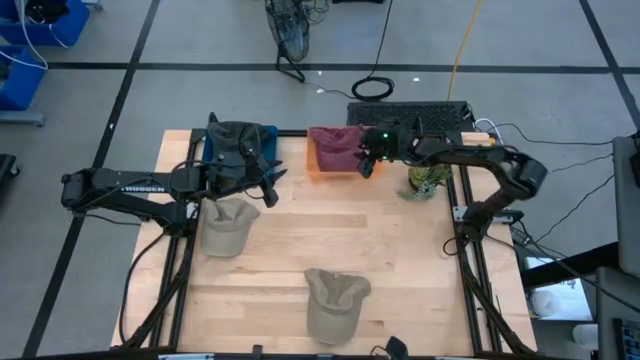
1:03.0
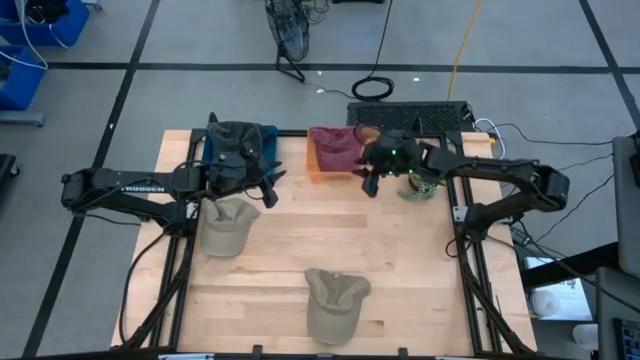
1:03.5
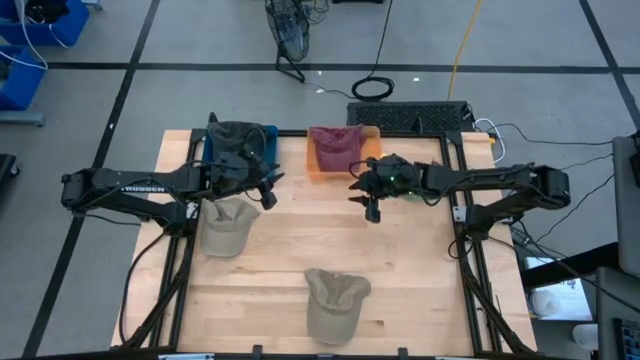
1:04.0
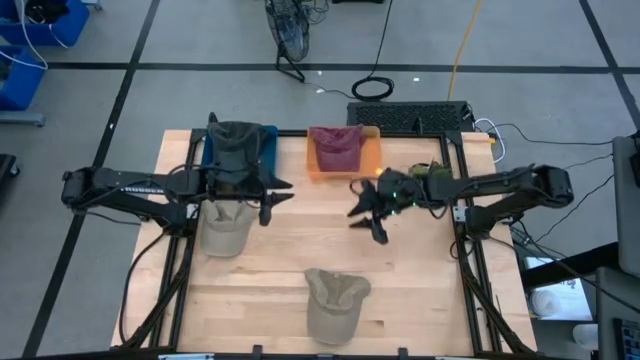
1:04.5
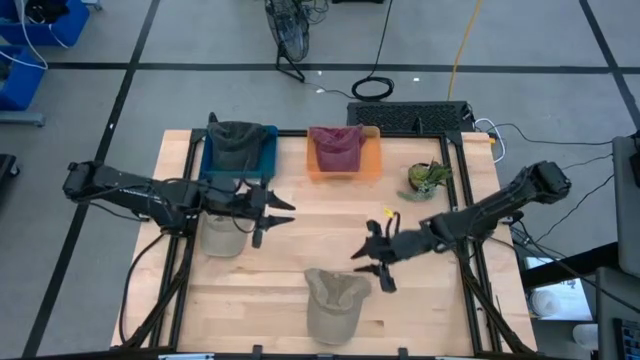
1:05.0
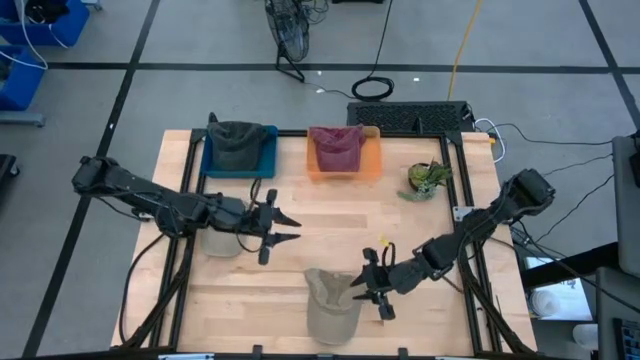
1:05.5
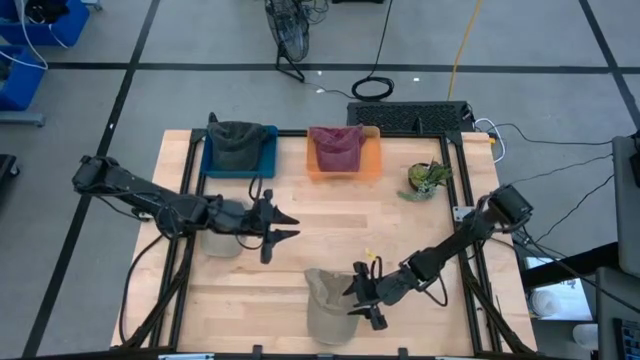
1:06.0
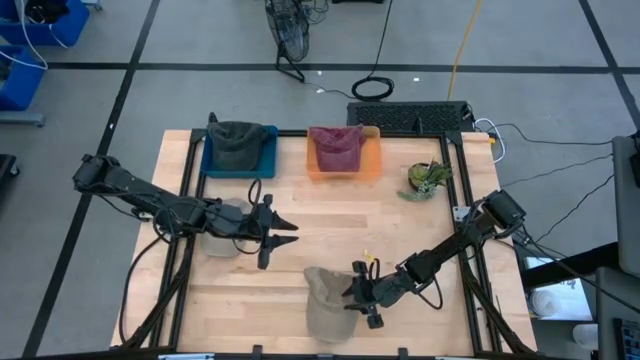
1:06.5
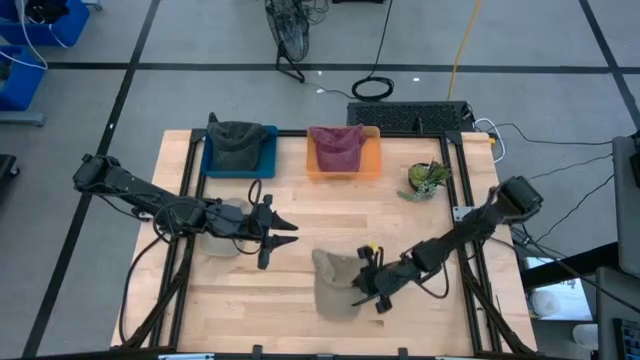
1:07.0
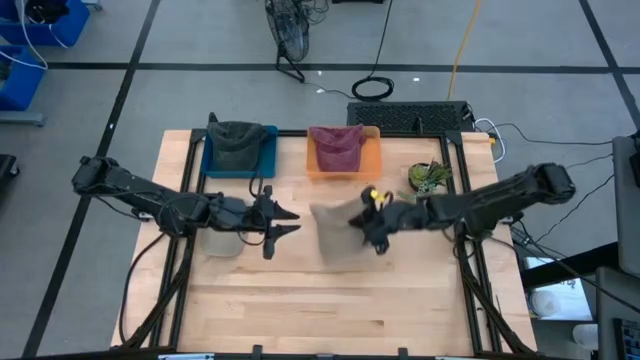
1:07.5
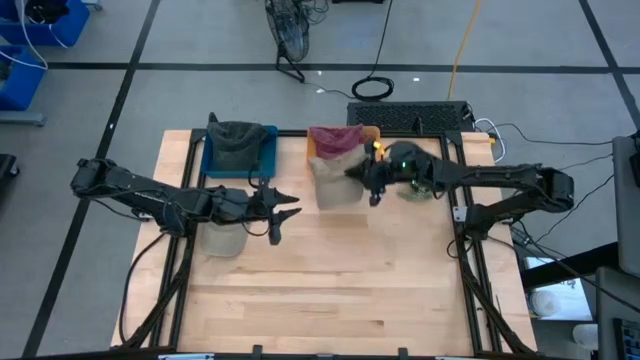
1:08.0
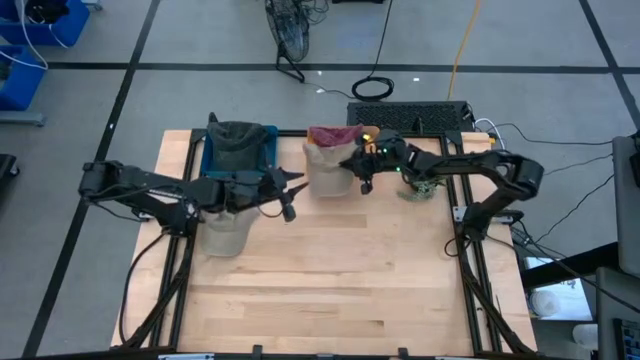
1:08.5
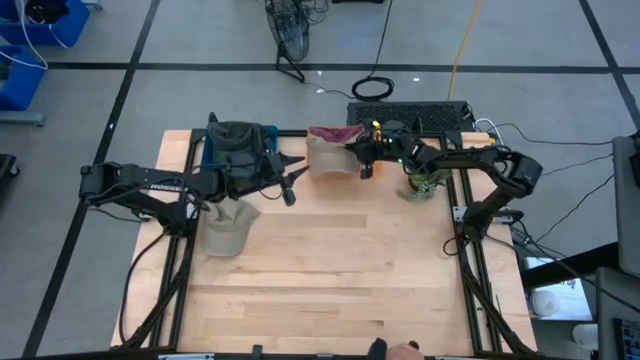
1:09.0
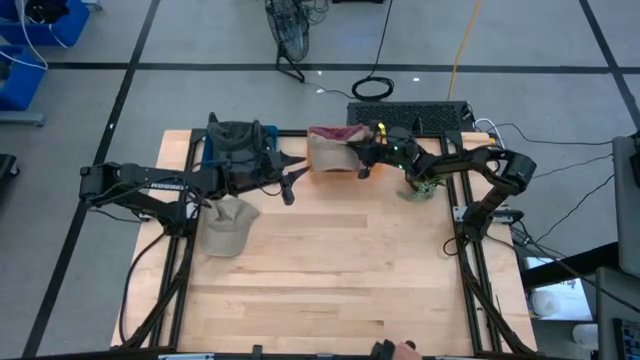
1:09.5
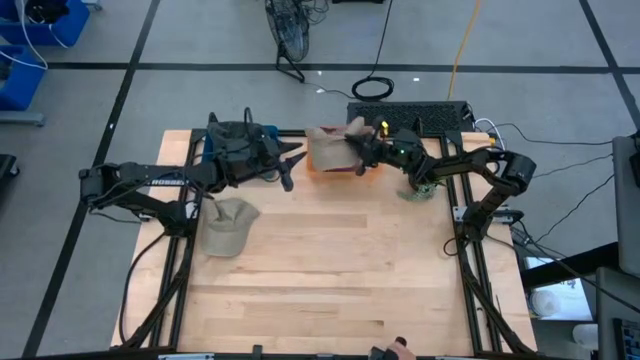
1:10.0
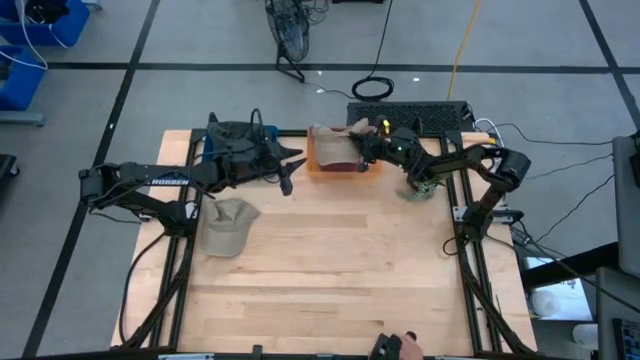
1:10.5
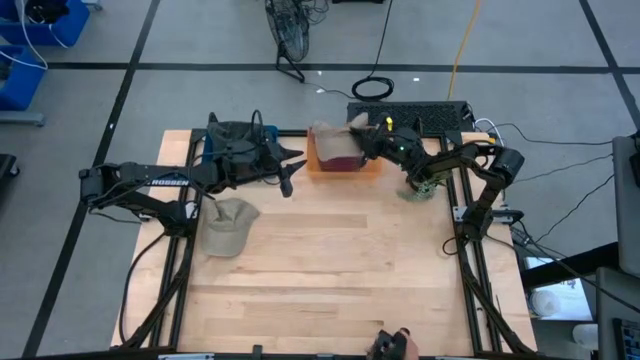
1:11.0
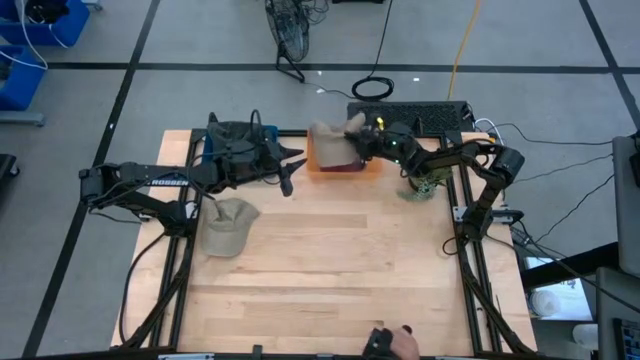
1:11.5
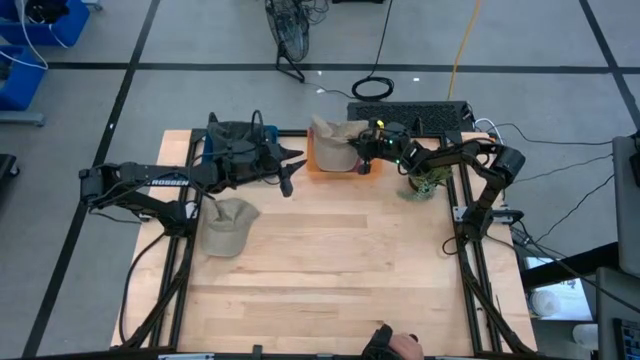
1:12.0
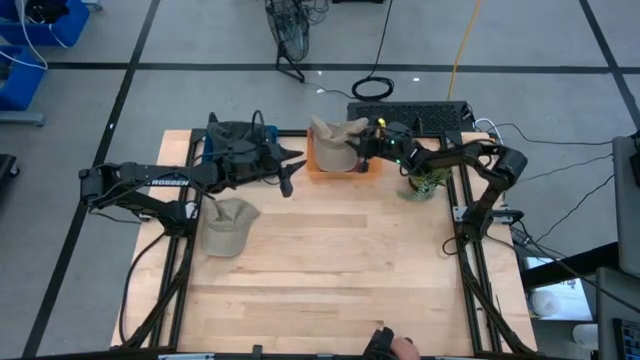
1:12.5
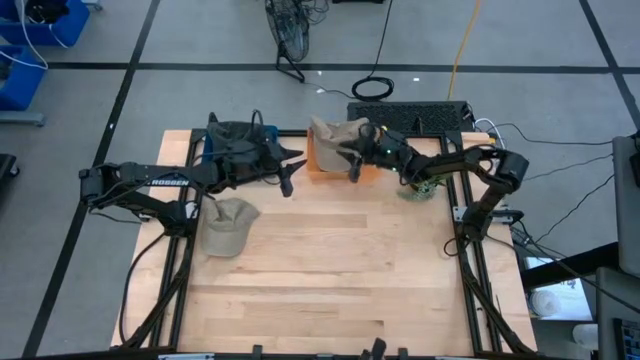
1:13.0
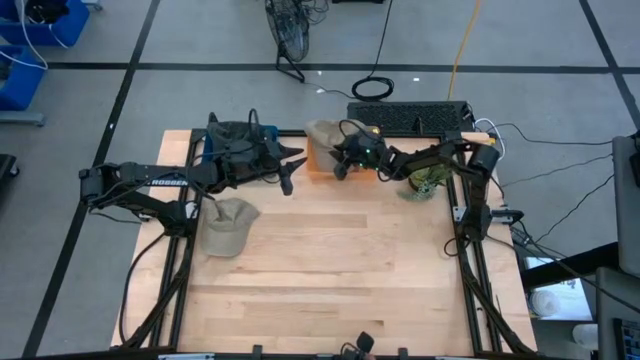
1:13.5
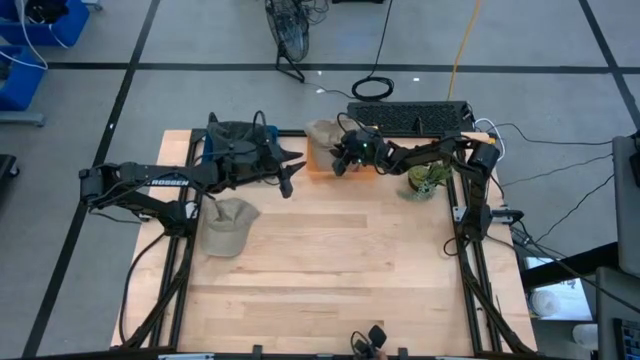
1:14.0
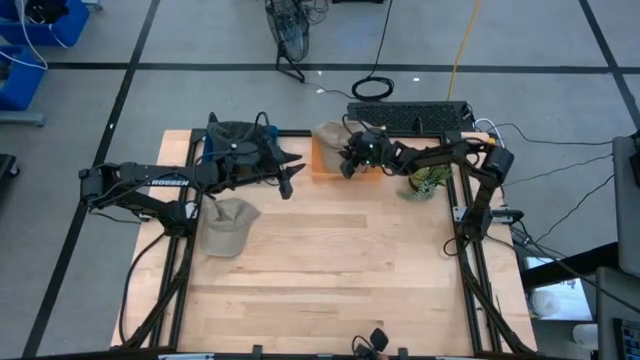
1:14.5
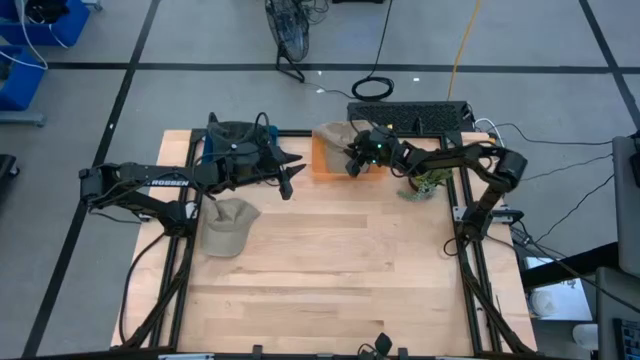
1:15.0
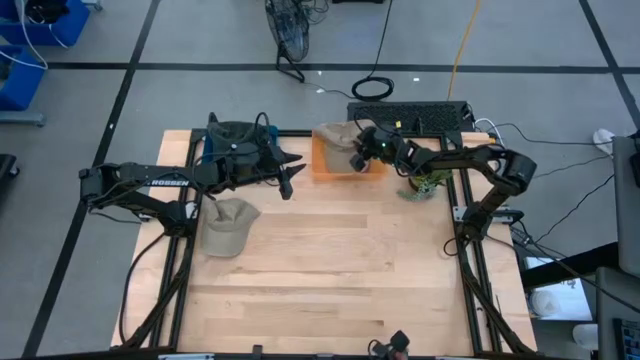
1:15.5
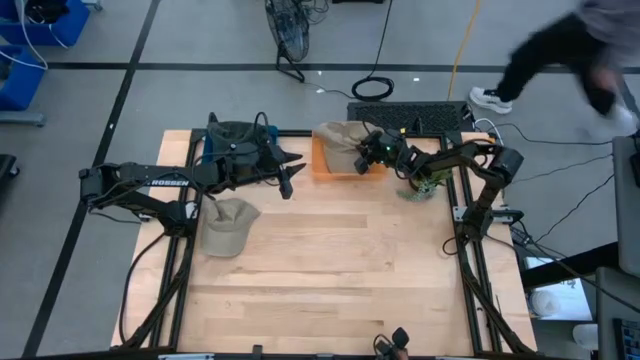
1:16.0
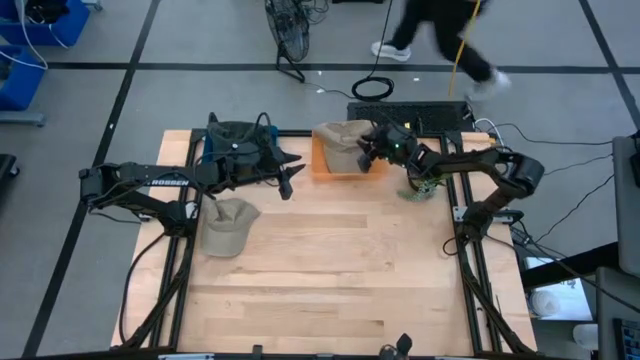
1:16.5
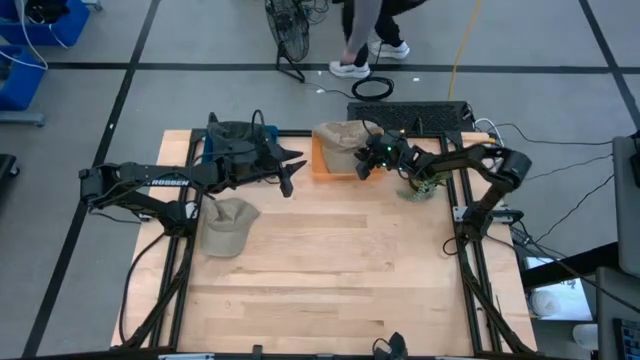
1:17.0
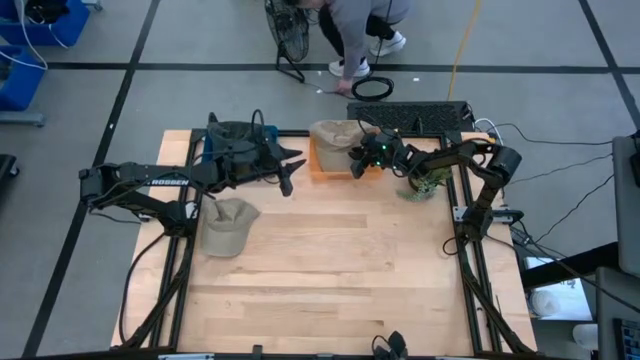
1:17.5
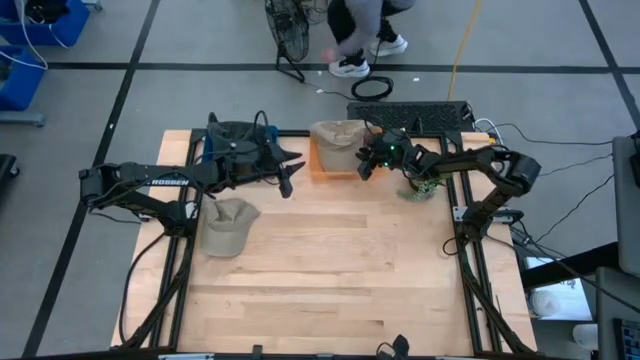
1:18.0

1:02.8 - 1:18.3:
Task: Pick & Place hat
Put the right brown cap into the orange bin

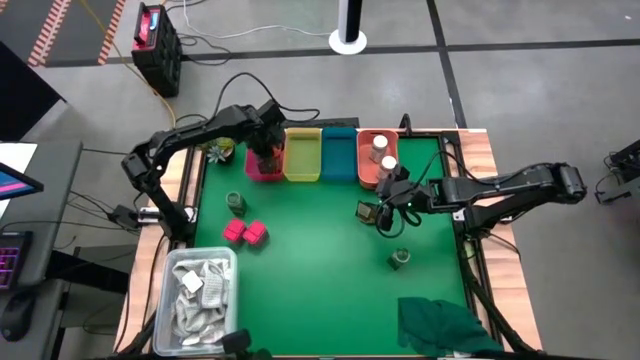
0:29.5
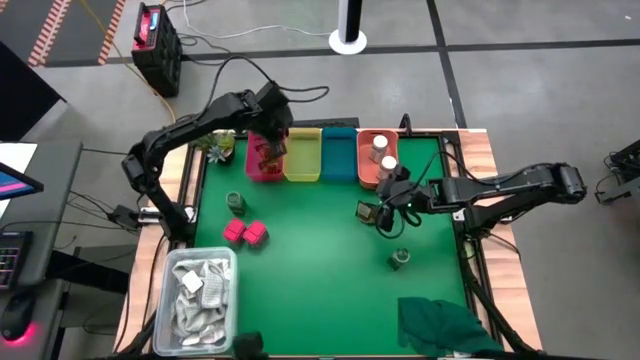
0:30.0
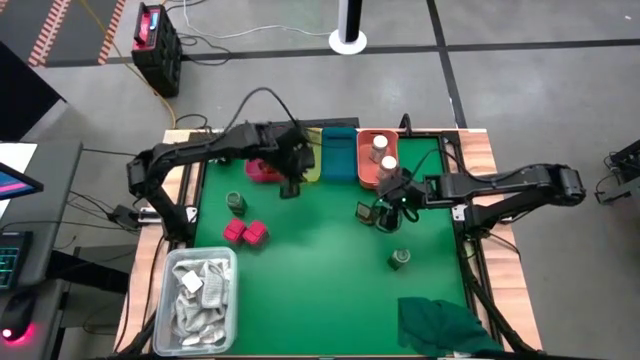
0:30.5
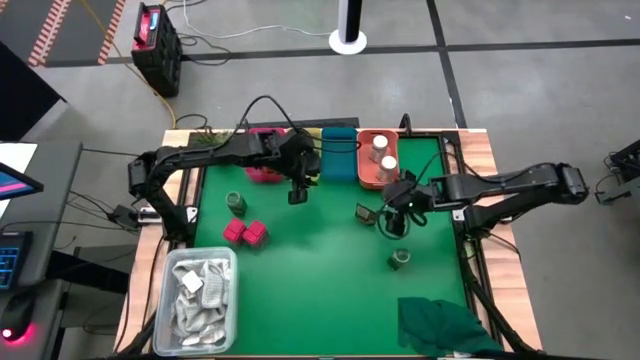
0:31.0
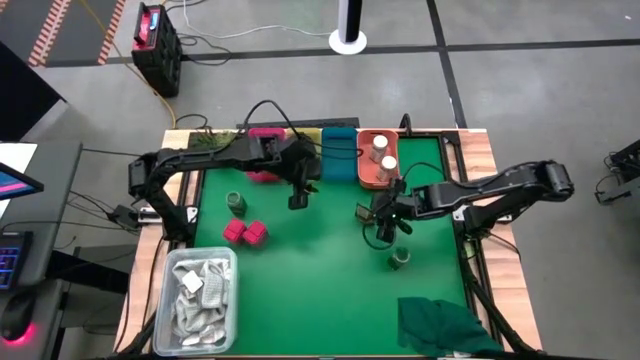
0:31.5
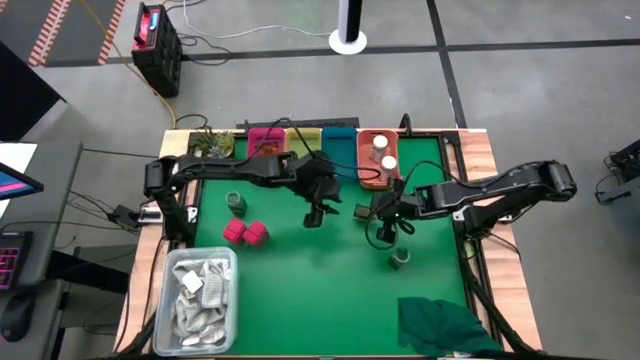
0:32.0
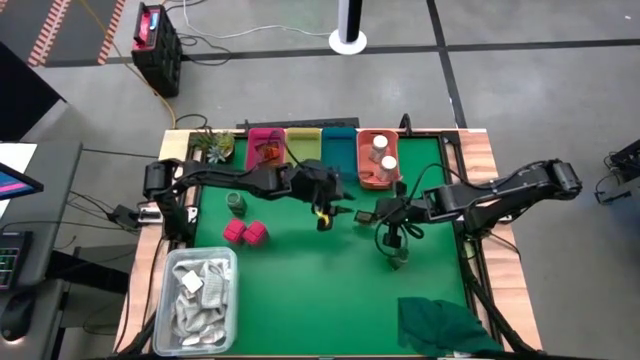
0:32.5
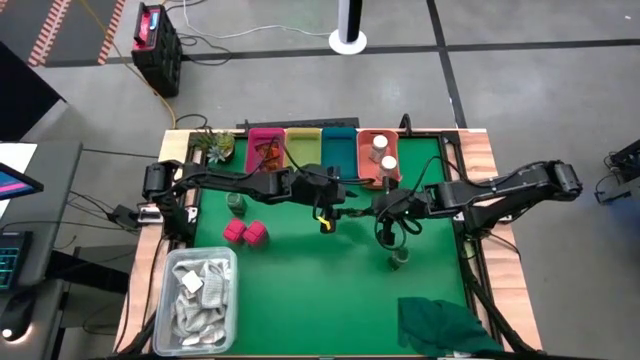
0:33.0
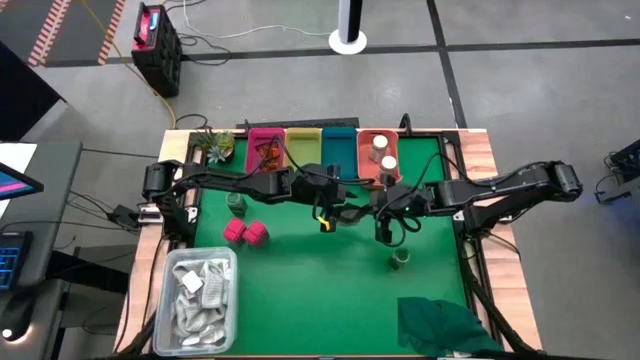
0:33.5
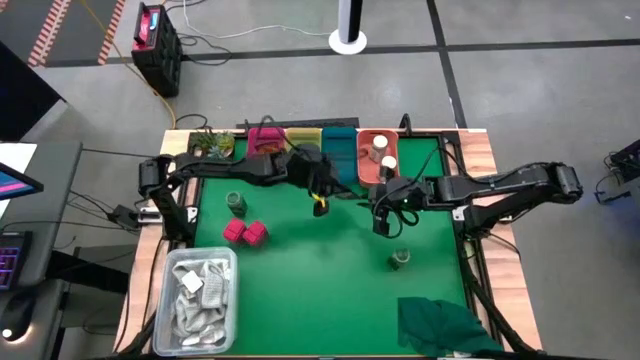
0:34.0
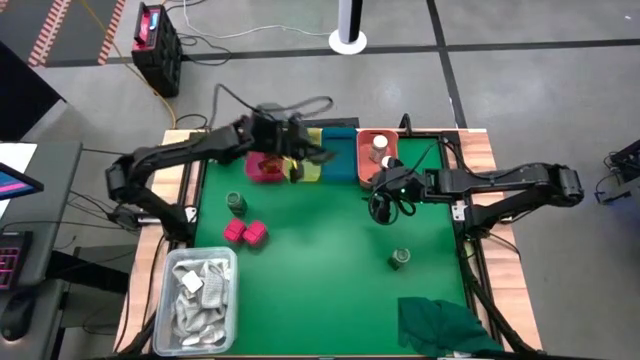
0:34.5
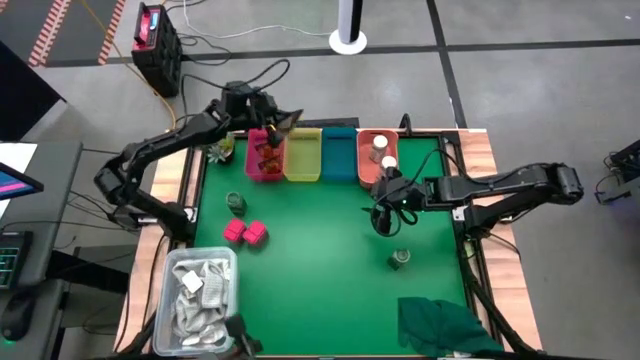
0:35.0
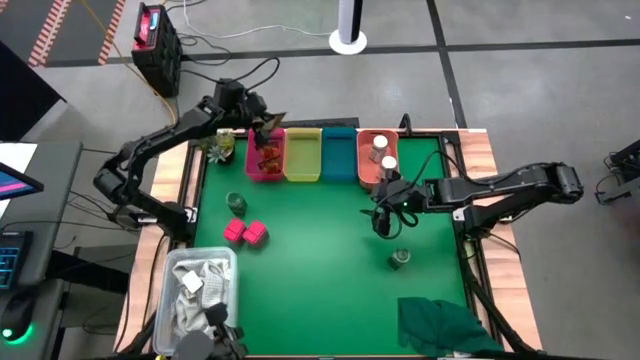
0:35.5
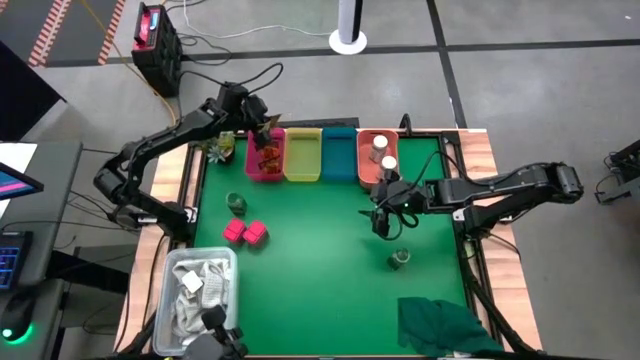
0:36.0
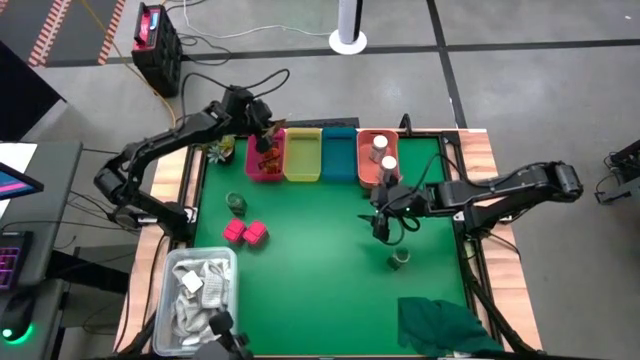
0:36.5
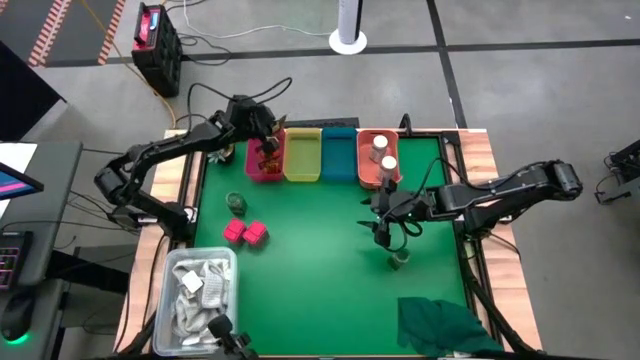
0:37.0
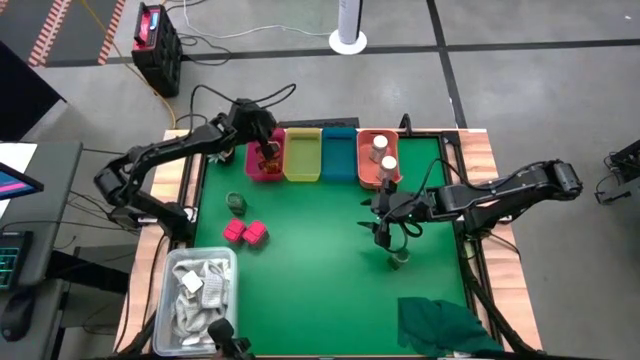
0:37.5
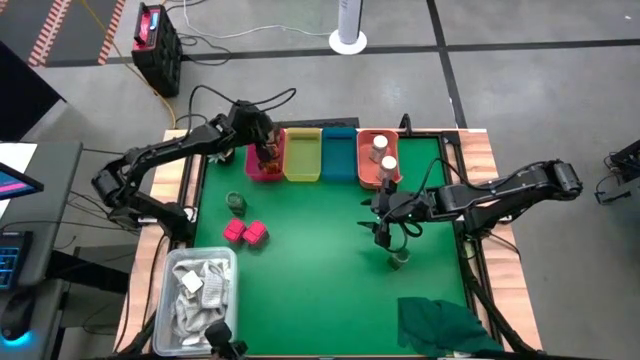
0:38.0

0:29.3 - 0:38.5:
Task: Sort spices by type
Put the orange seasoning pack into the pink bin
